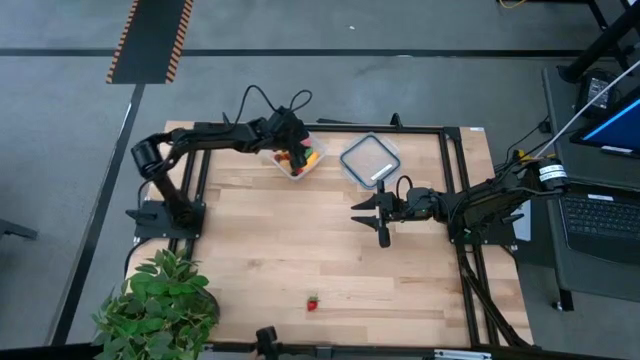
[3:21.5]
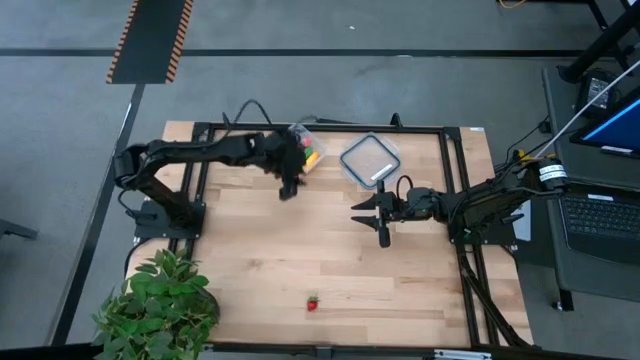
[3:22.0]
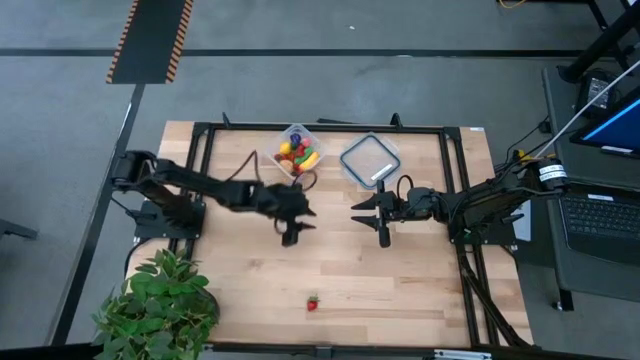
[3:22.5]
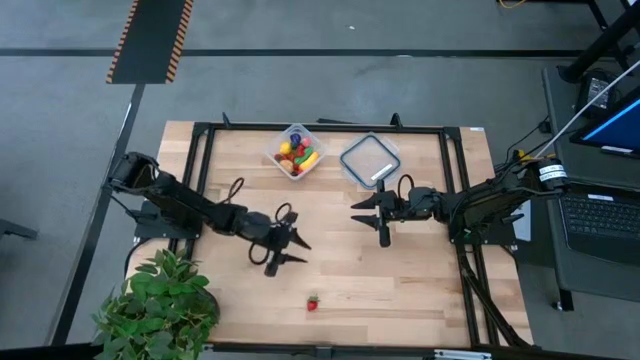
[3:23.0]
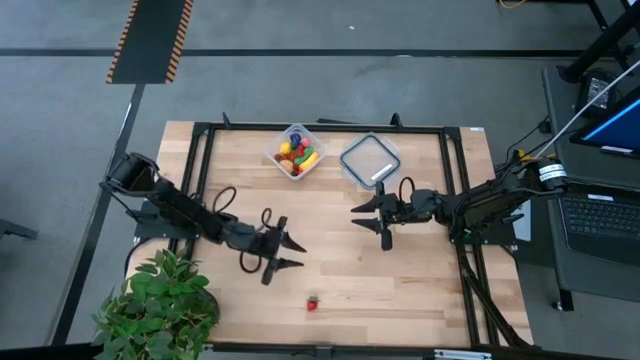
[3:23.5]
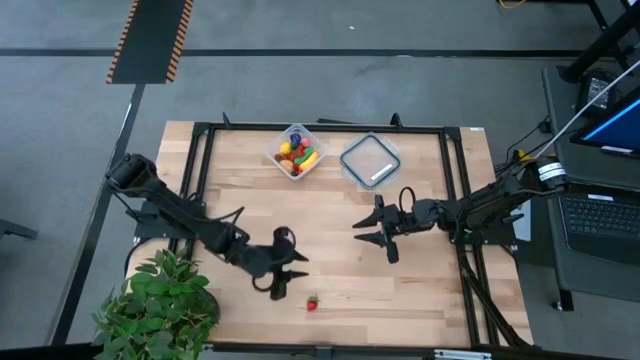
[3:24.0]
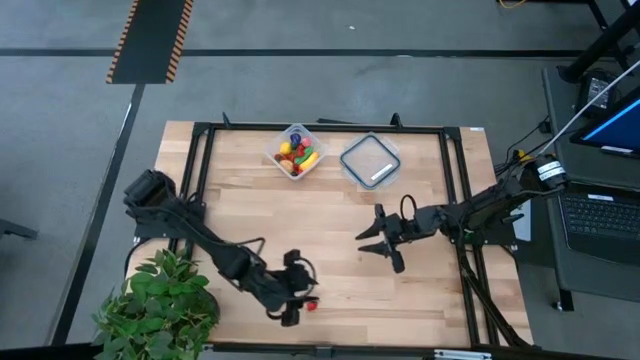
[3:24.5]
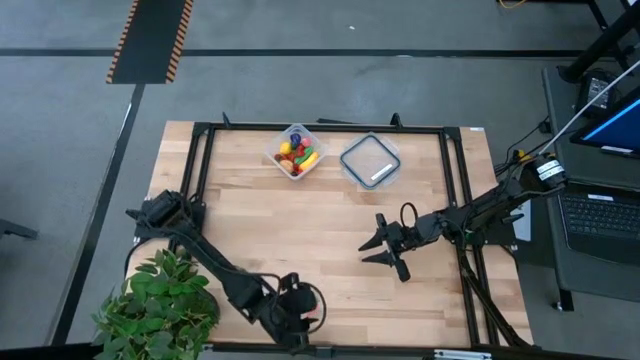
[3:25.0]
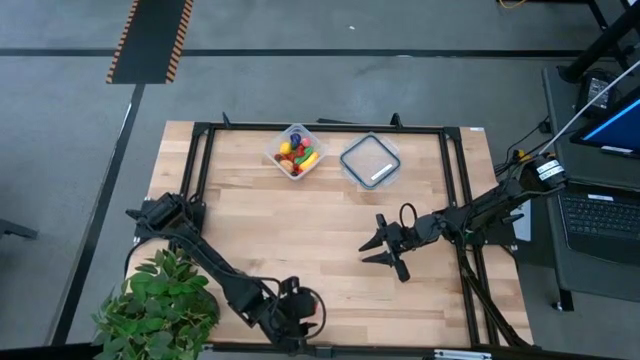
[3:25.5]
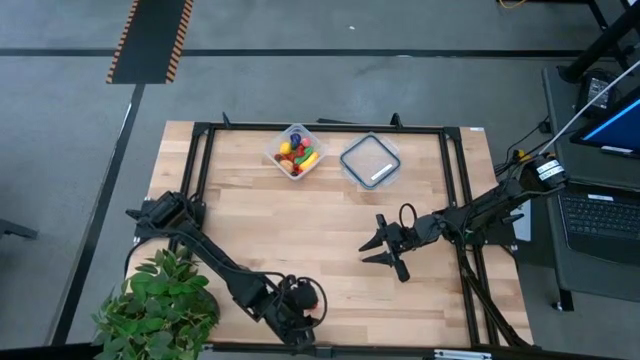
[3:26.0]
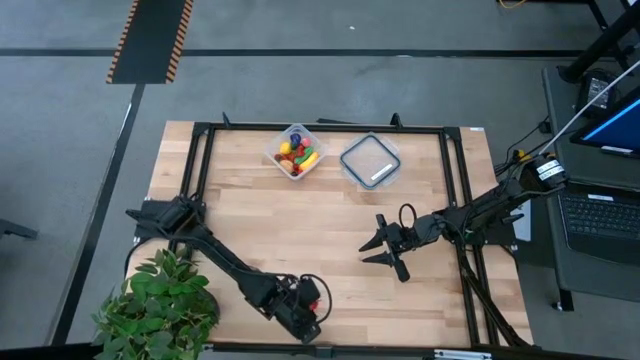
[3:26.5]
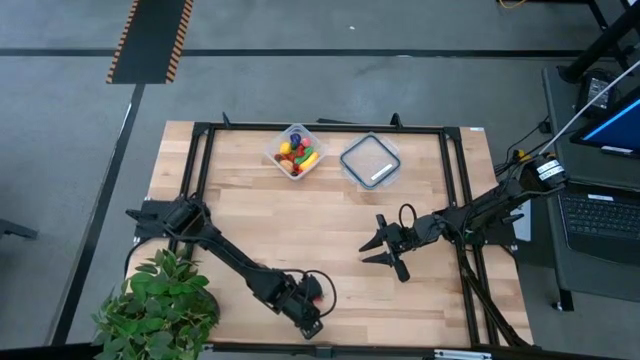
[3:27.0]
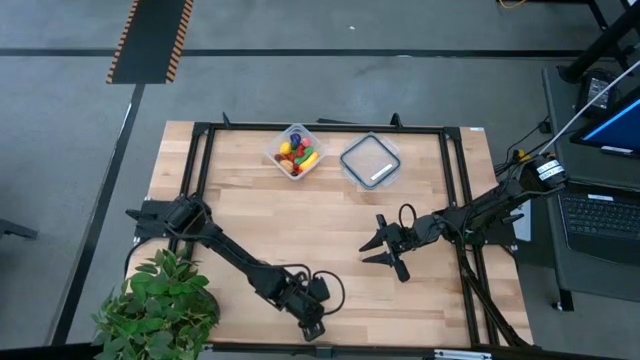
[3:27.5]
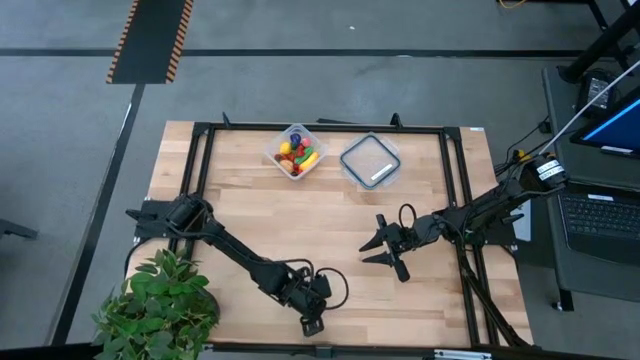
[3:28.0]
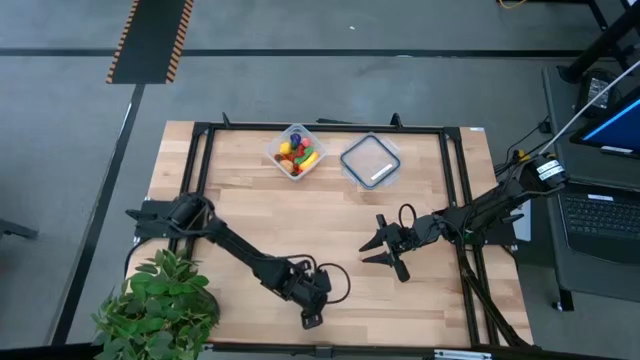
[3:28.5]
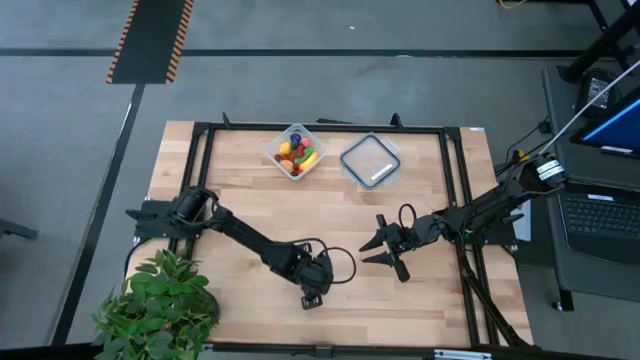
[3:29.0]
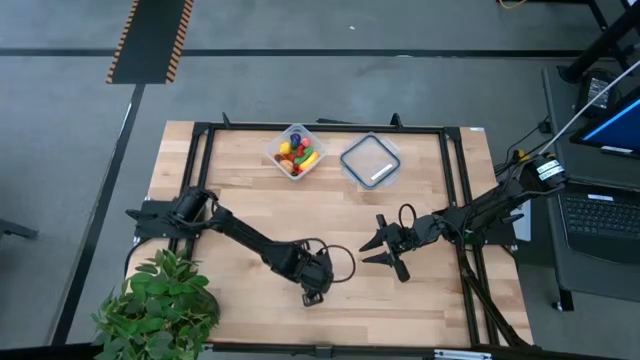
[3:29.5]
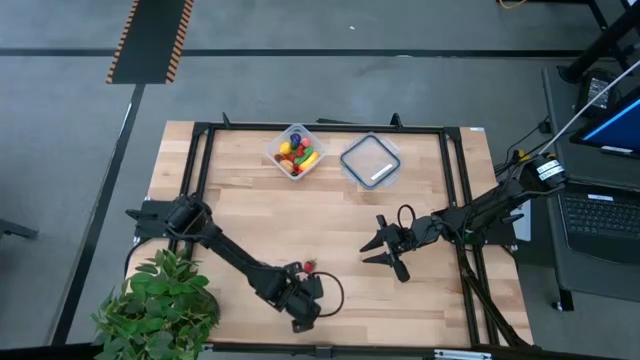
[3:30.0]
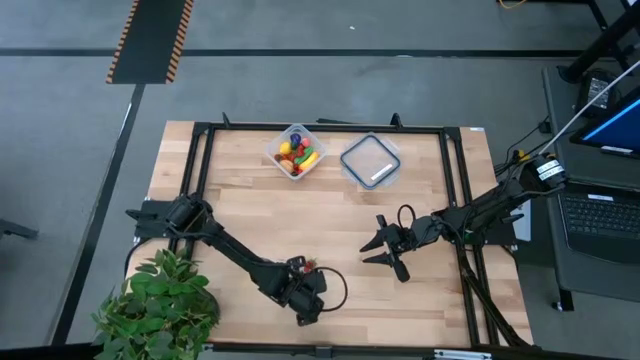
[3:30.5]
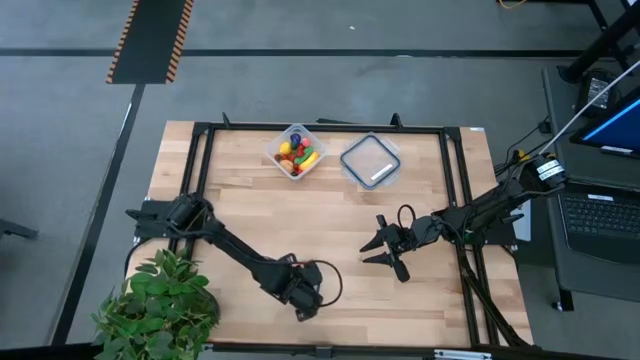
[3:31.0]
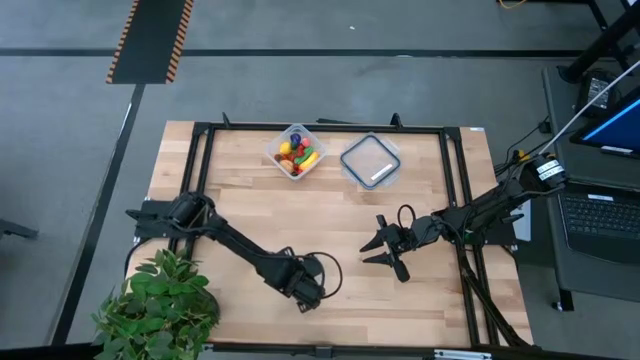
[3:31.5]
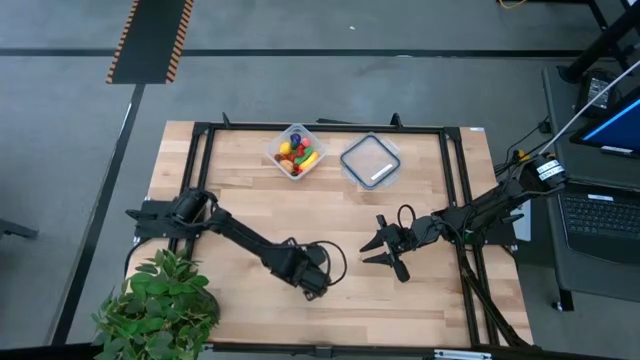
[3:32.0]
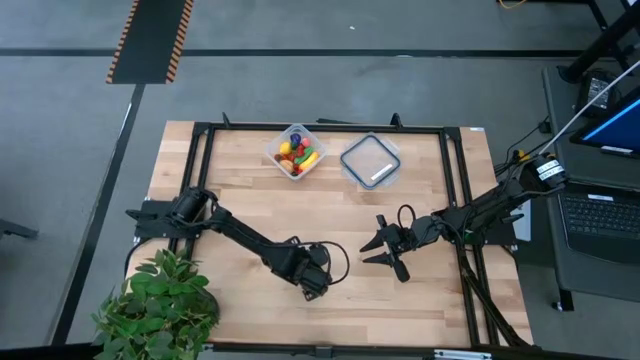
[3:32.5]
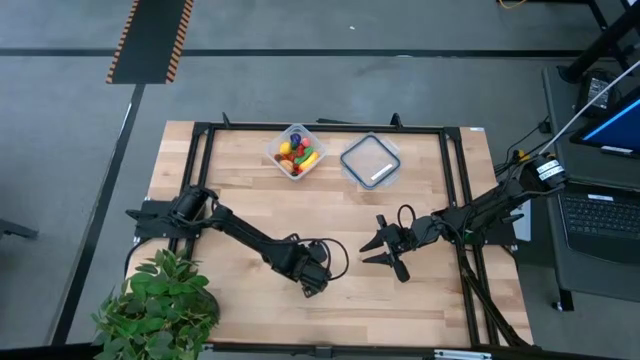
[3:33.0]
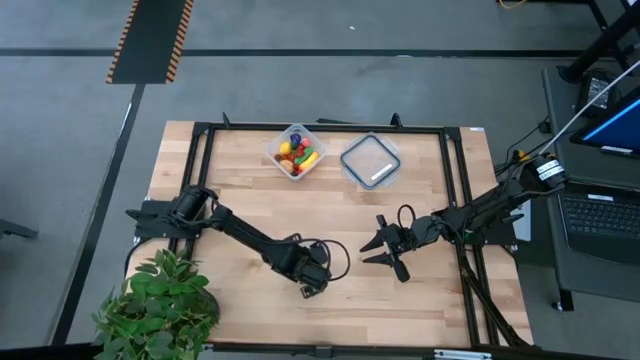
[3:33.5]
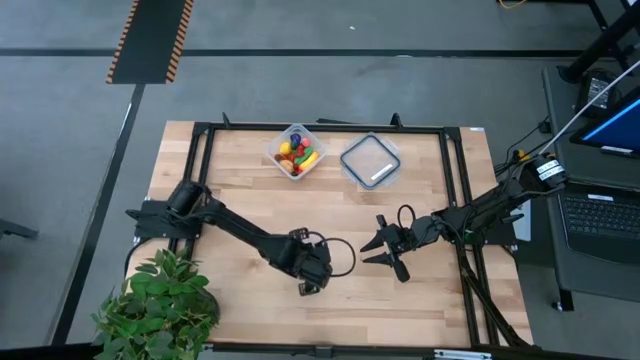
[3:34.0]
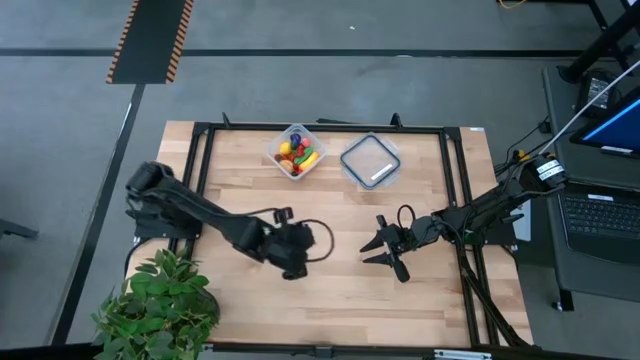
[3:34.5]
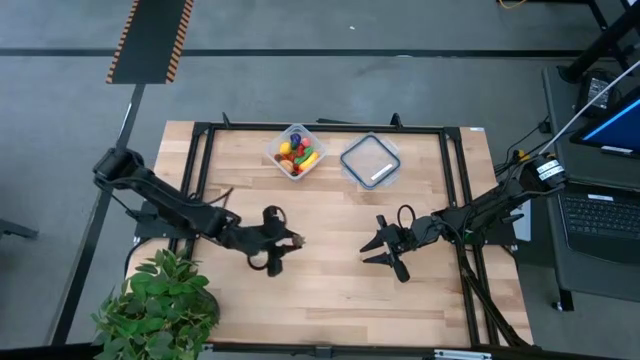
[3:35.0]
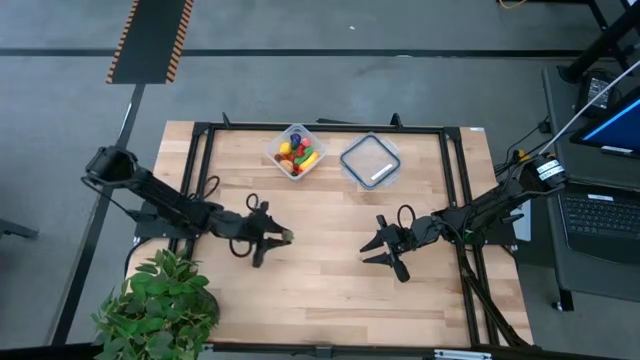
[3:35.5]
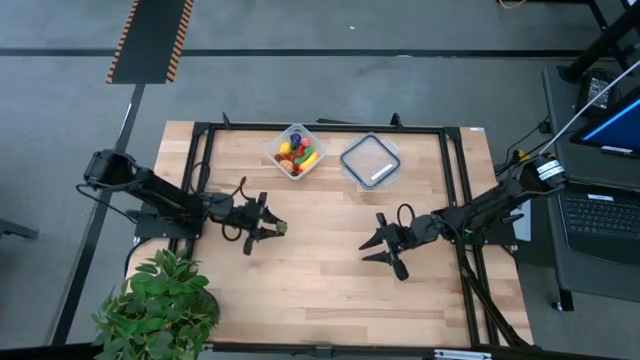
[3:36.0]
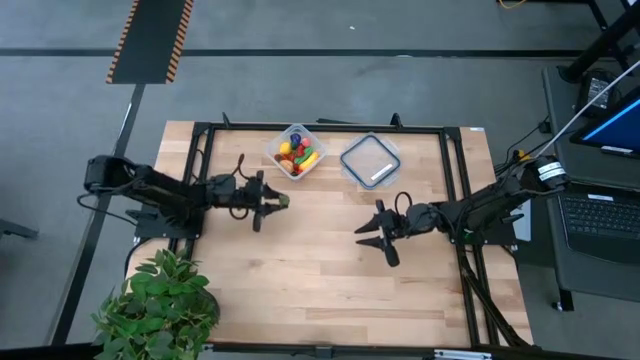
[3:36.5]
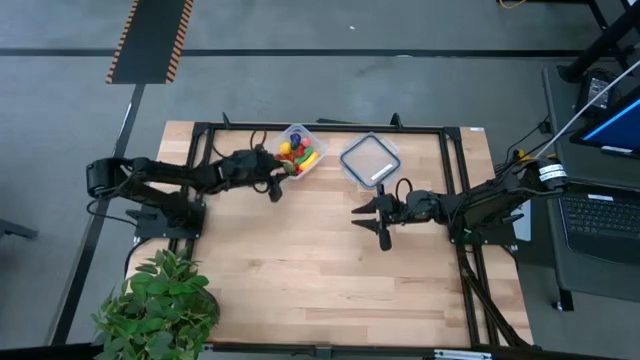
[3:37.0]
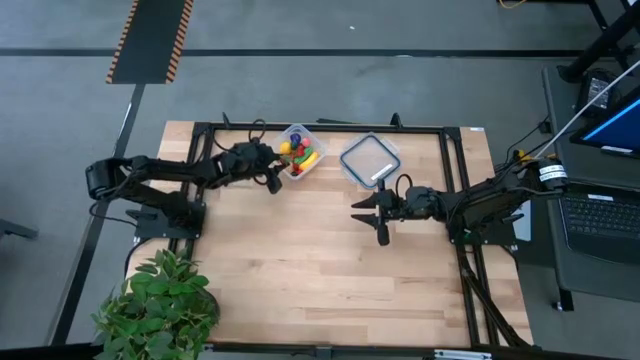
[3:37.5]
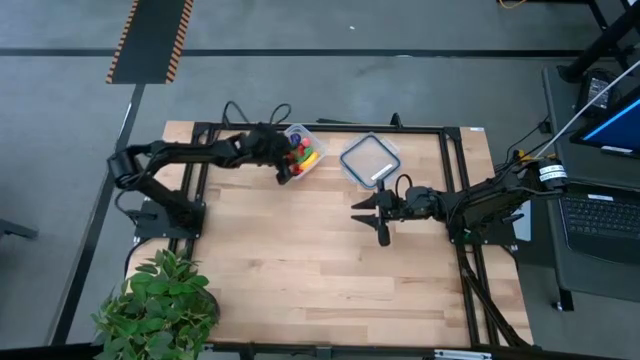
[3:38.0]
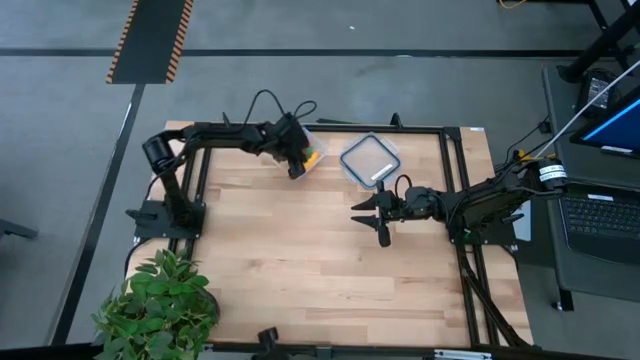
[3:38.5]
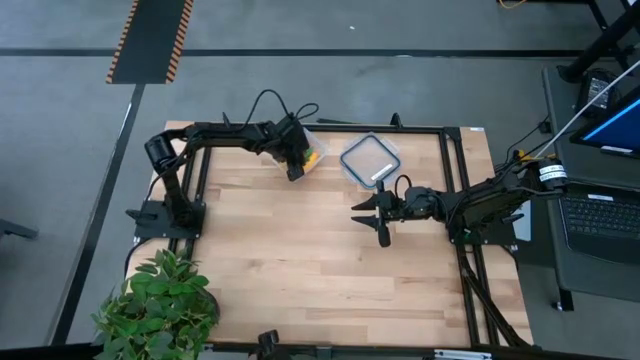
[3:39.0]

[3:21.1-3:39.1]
Task: Pick and placing Produce into tupperware
Put the strawberry into the transparent container
